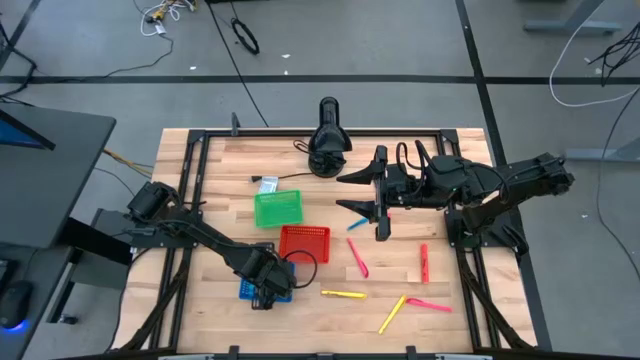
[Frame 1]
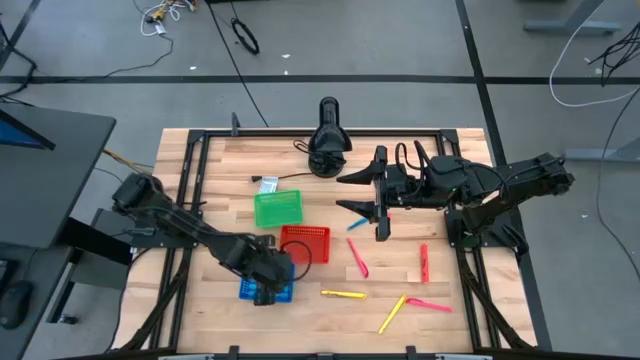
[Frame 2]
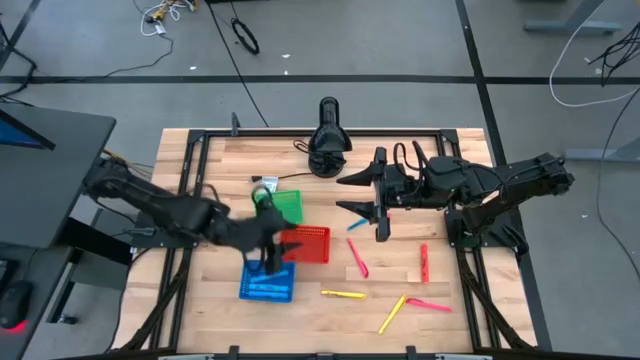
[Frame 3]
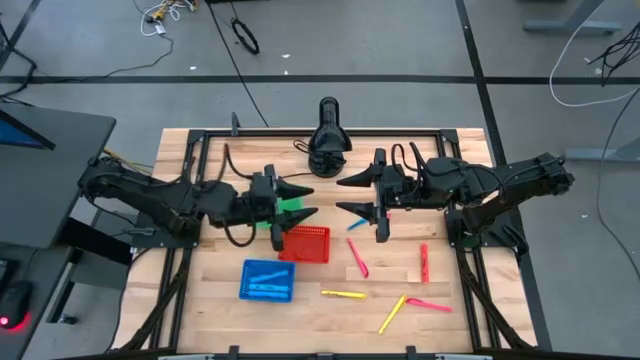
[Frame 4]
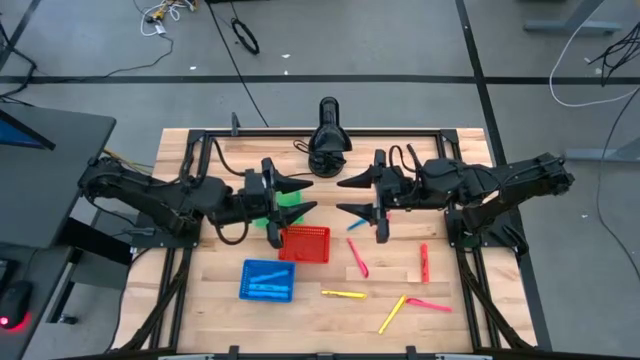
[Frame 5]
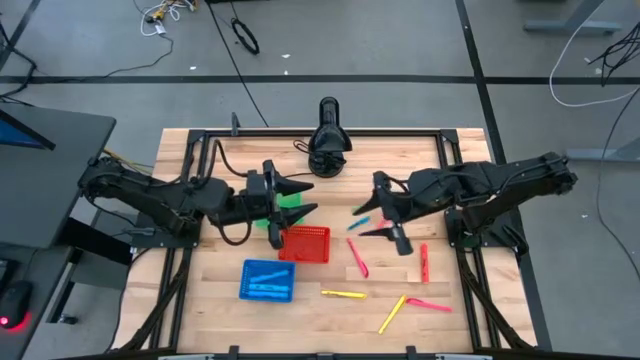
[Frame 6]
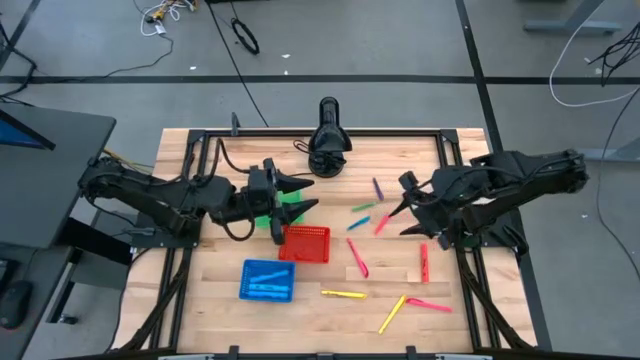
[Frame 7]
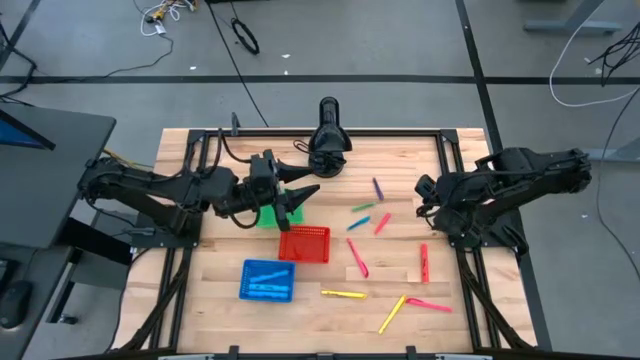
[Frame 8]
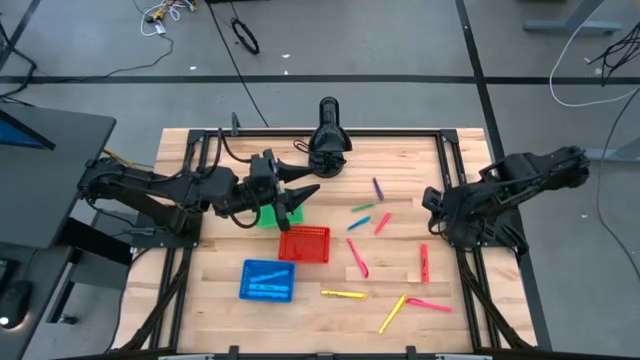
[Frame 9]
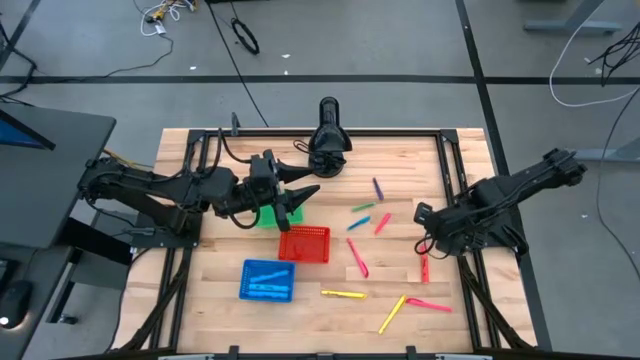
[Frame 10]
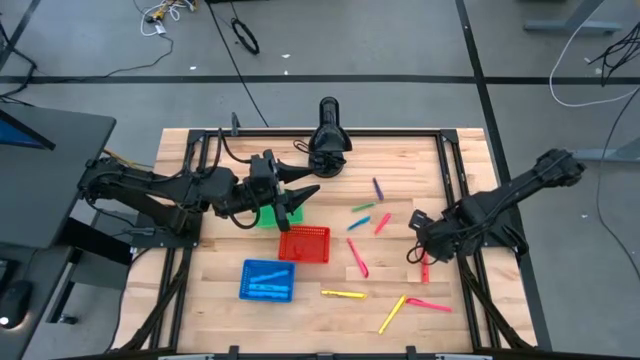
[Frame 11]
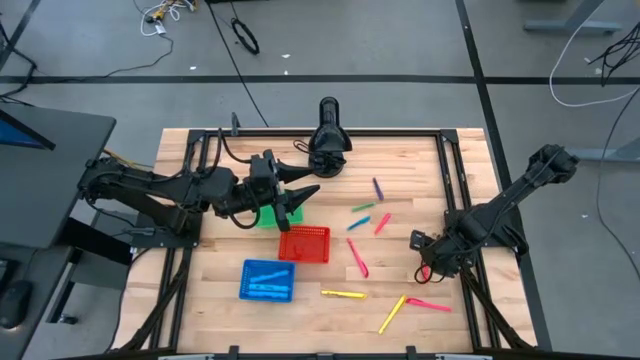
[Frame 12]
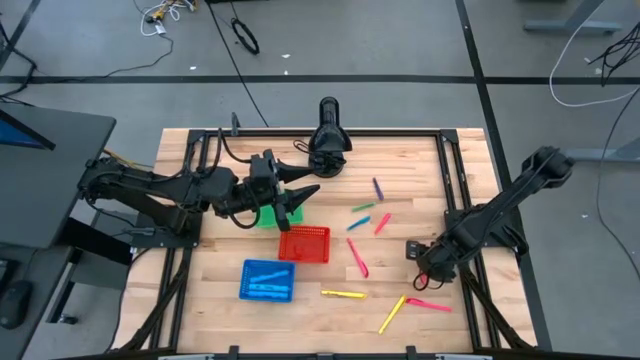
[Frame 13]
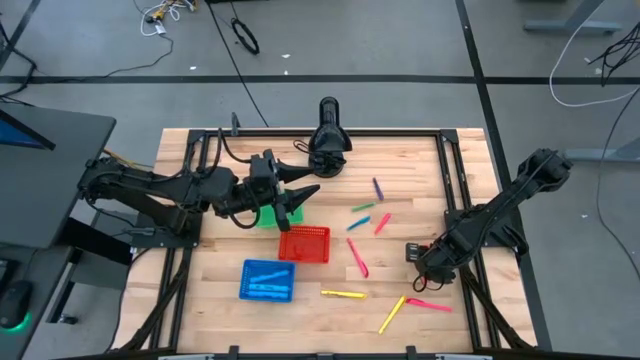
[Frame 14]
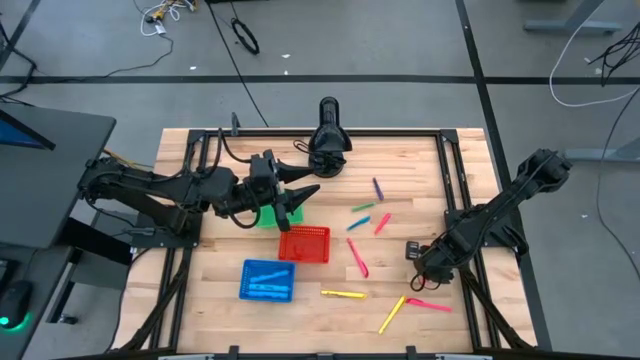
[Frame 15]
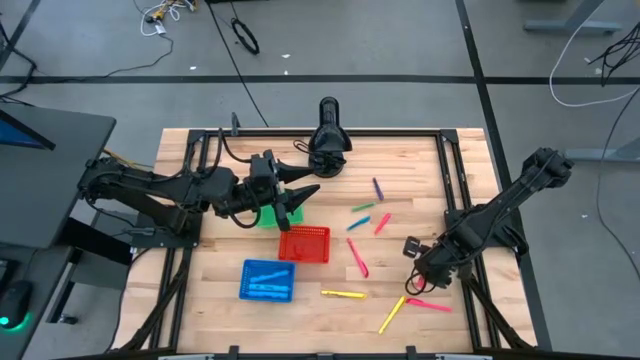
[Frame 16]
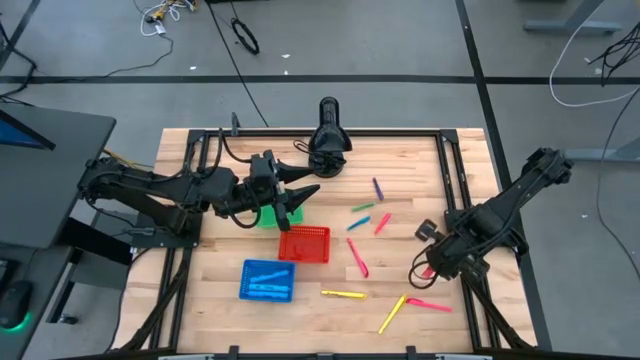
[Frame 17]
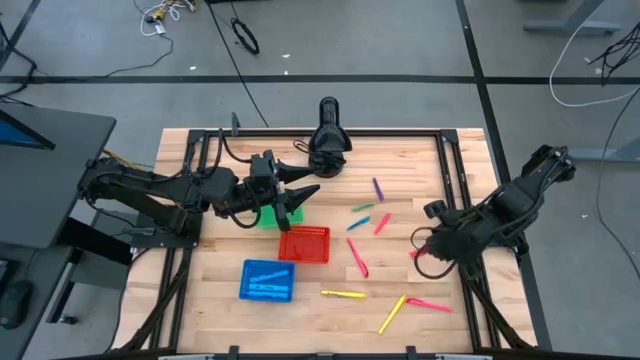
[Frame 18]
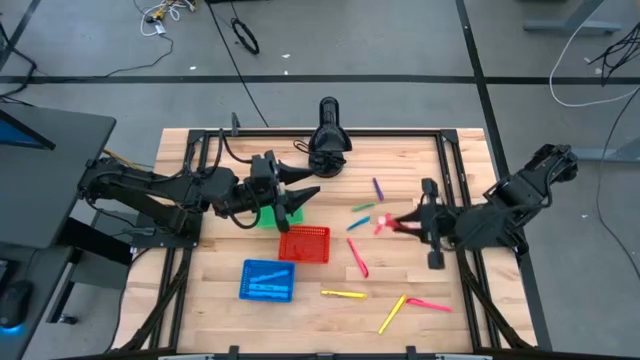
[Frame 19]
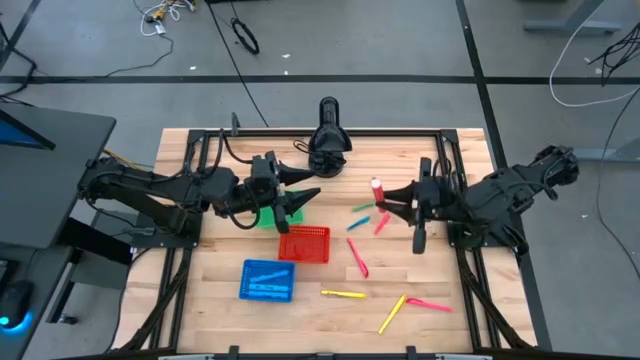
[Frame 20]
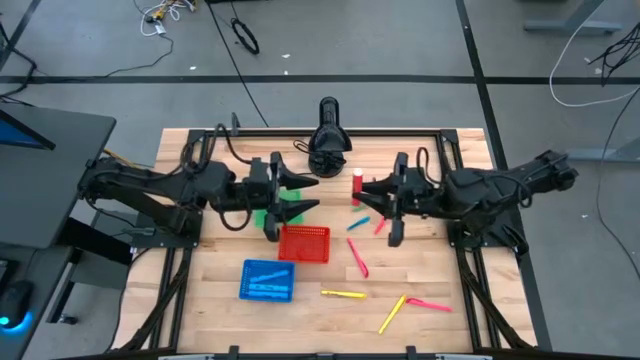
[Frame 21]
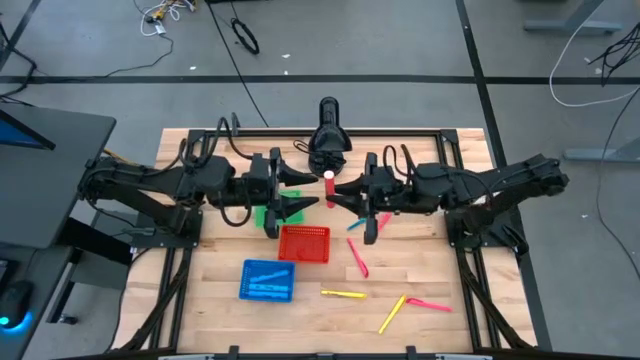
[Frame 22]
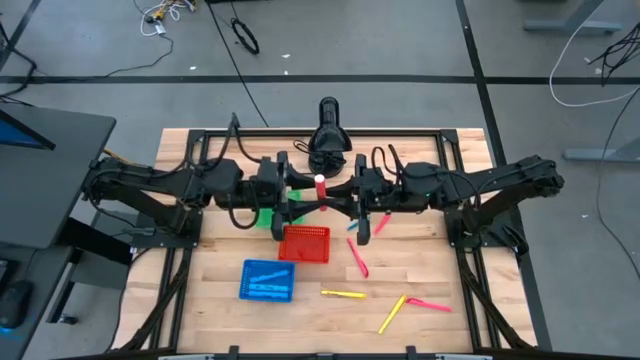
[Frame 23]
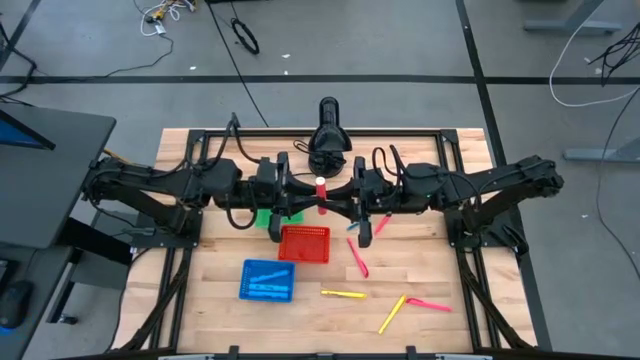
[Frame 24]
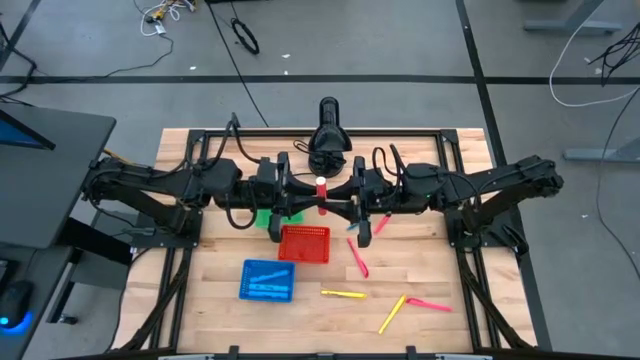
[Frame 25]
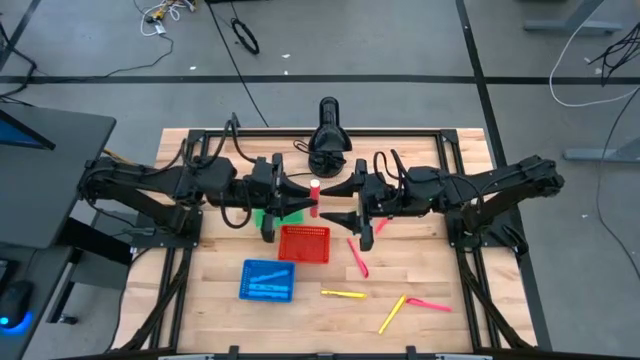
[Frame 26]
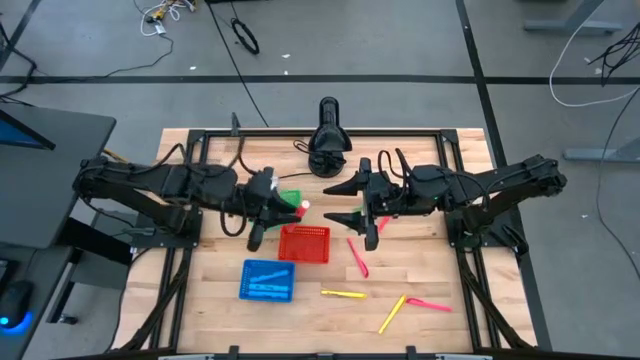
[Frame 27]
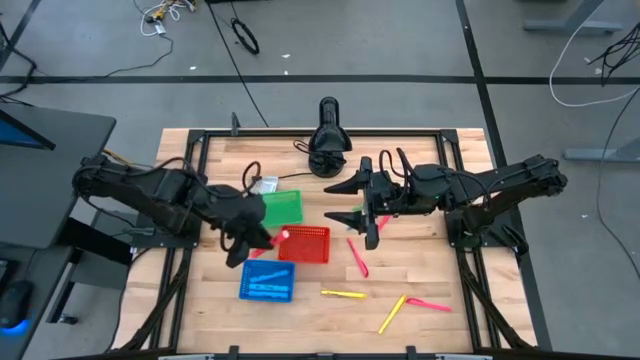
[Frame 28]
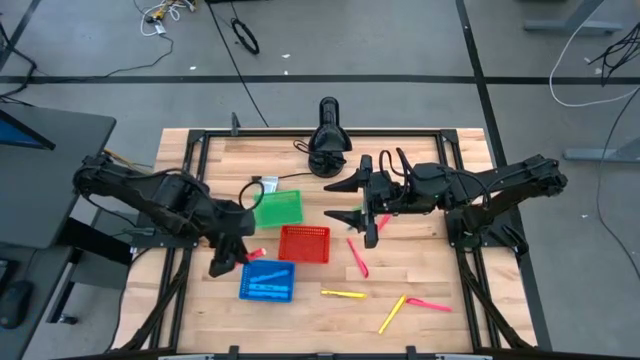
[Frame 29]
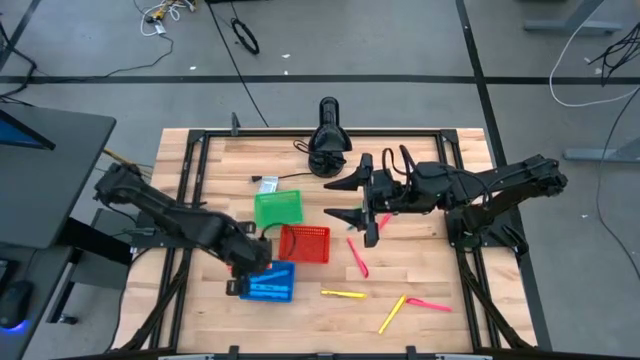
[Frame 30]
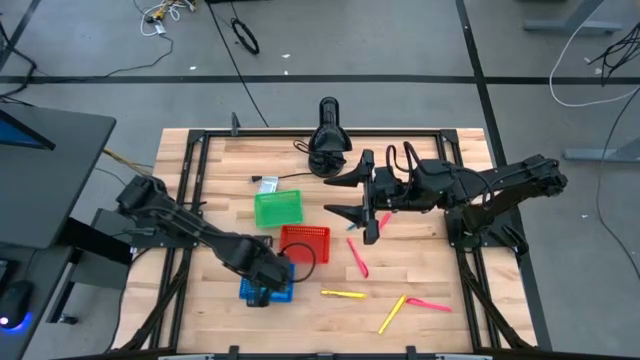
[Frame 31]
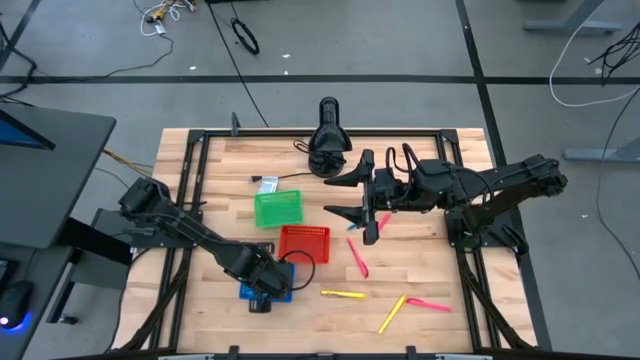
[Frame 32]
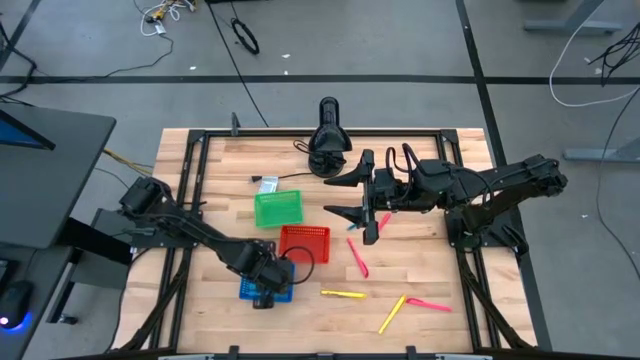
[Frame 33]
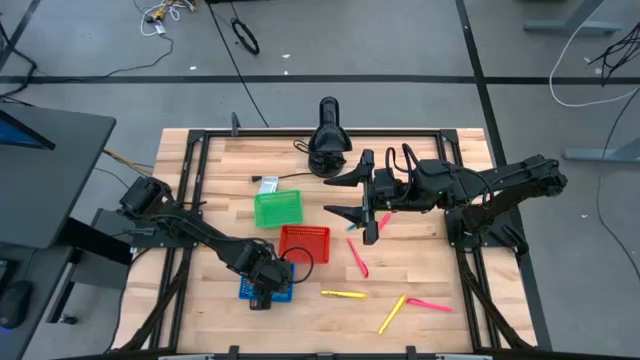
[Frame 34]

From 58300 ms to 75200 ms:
Task: Pick & Place Markers
Put the orange highlighter pen into the blue bin

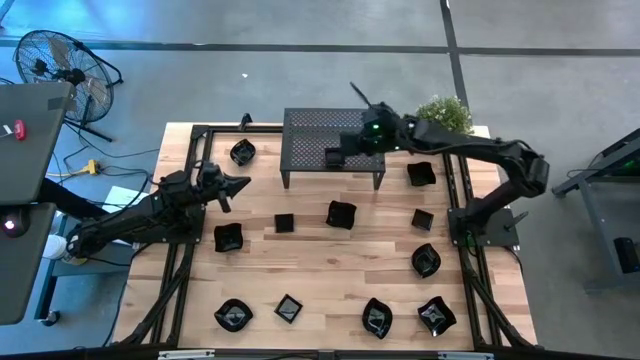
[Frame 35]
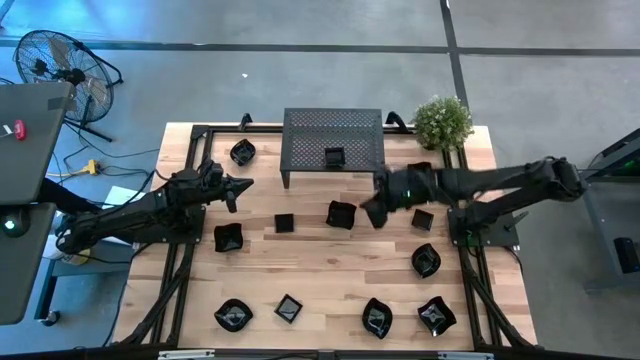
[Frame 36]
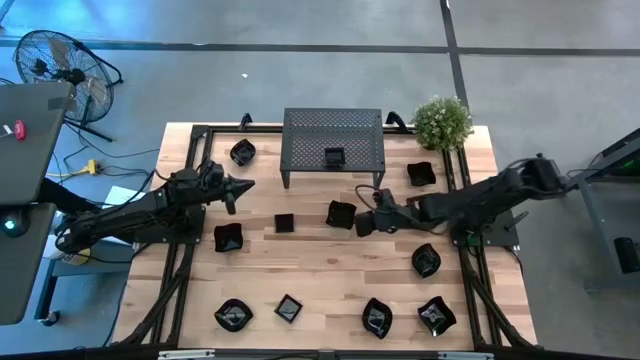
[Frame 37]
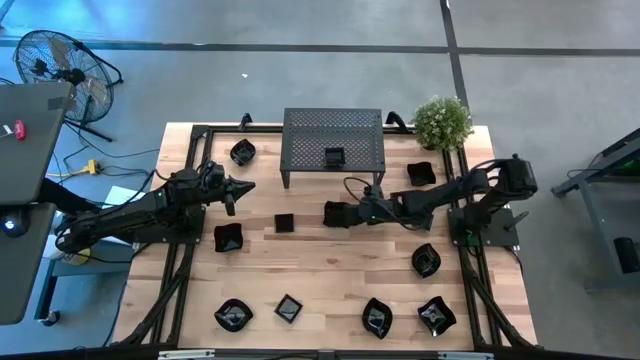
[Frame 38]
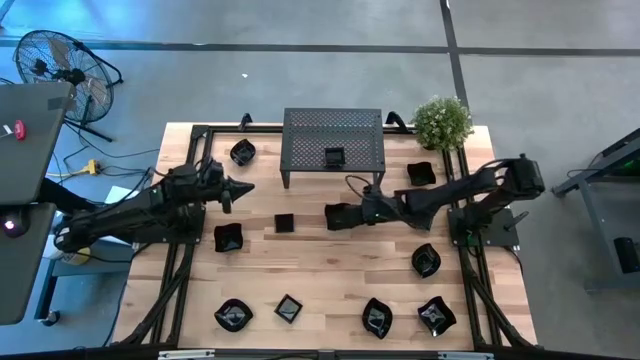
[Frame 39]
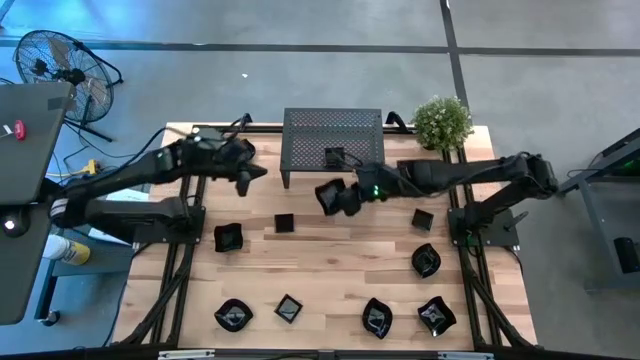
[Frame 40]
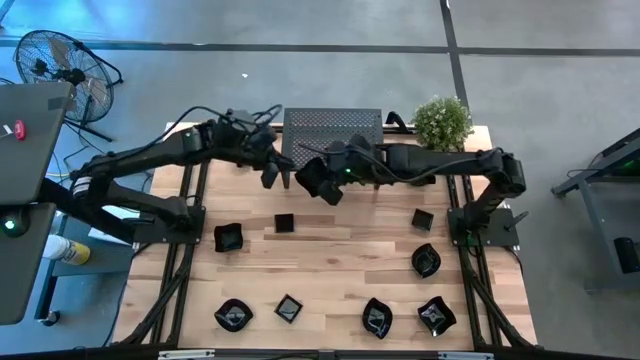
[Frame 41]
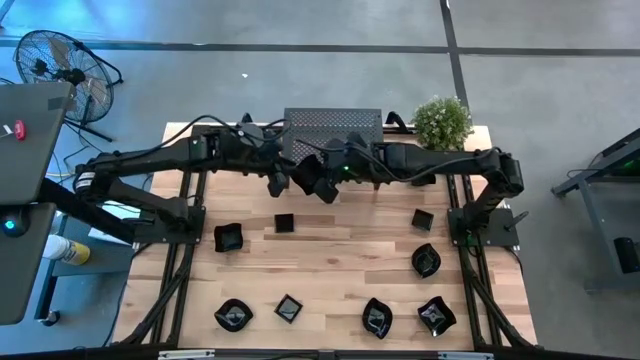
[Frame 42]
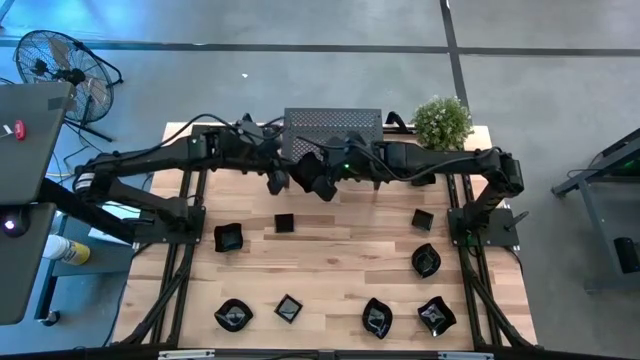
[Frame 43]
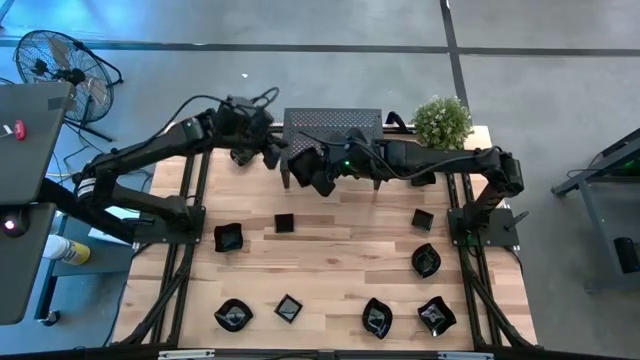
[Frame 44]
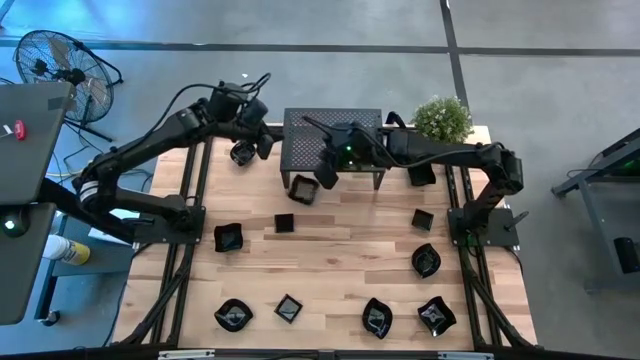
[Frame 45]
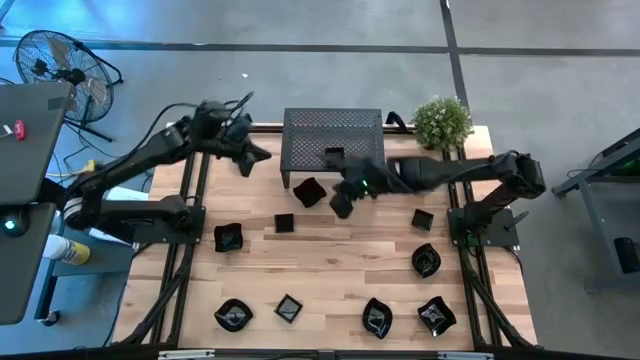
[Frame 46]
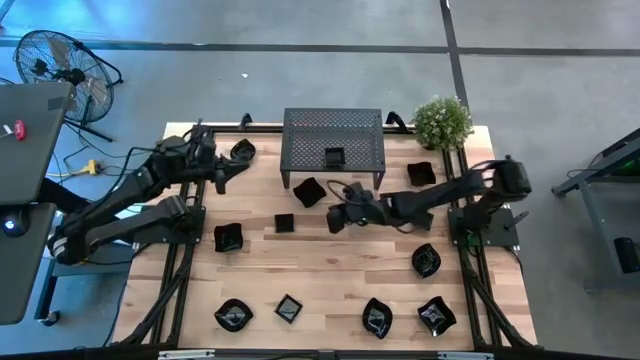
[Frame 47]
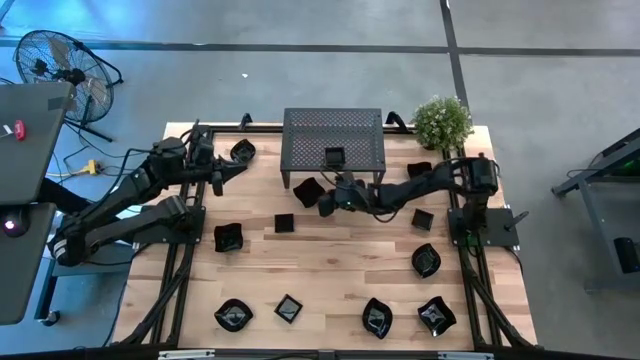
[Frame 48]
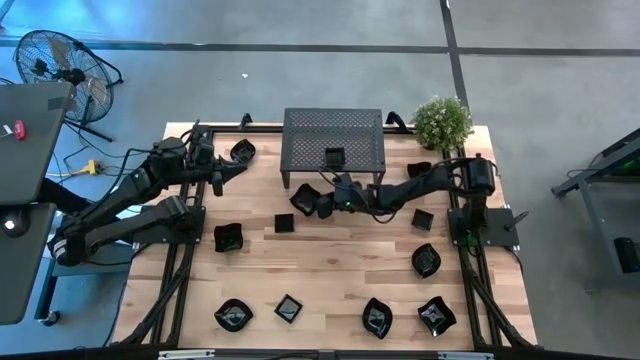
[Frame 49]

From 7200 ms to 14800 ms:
Task: Pick & Place Mini shaped plates
Put the black distorted square plate on the shelf
